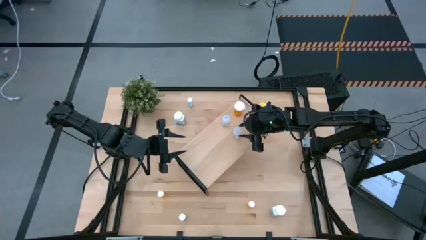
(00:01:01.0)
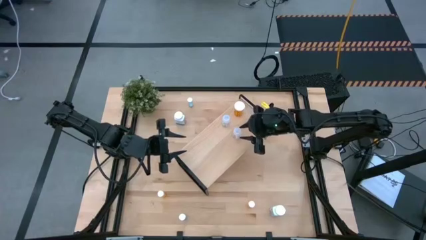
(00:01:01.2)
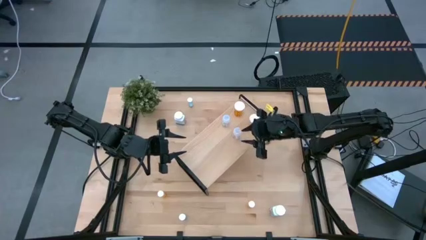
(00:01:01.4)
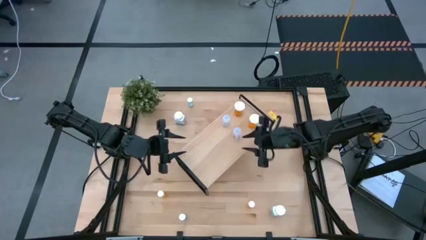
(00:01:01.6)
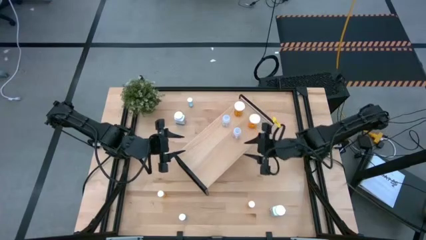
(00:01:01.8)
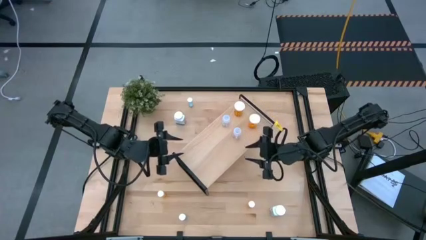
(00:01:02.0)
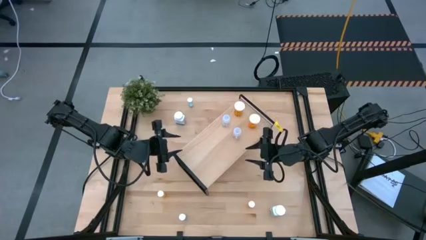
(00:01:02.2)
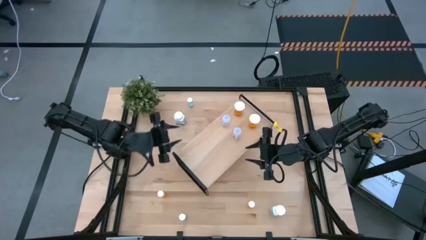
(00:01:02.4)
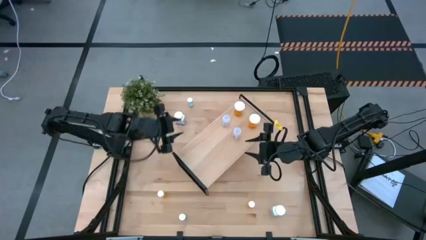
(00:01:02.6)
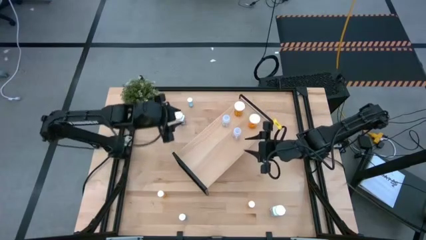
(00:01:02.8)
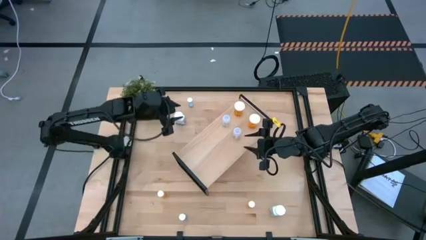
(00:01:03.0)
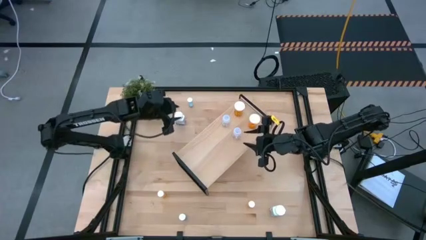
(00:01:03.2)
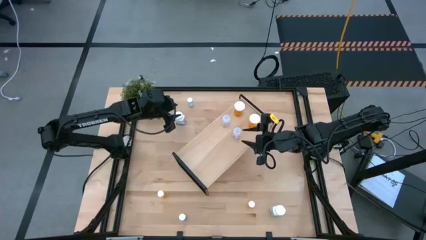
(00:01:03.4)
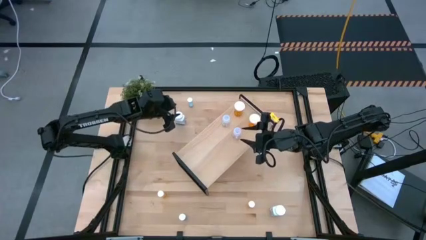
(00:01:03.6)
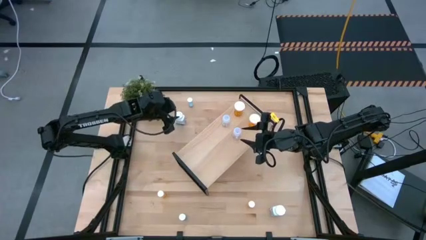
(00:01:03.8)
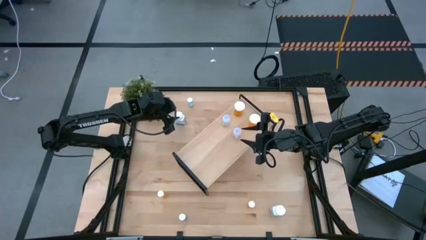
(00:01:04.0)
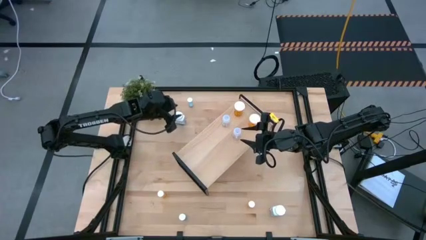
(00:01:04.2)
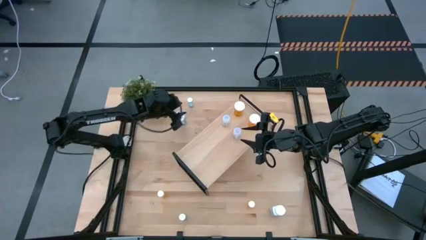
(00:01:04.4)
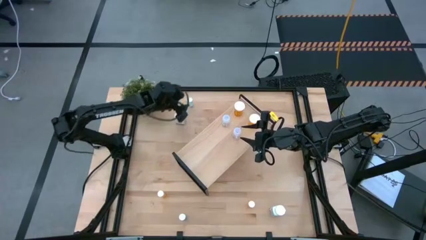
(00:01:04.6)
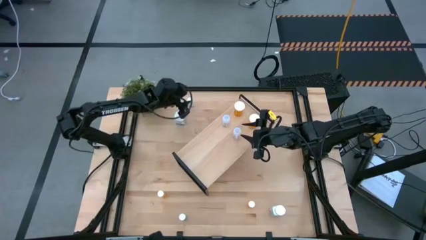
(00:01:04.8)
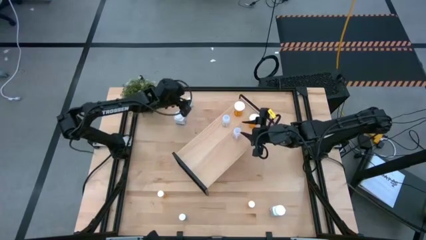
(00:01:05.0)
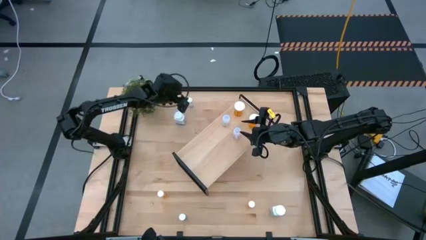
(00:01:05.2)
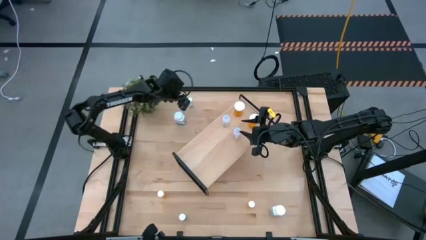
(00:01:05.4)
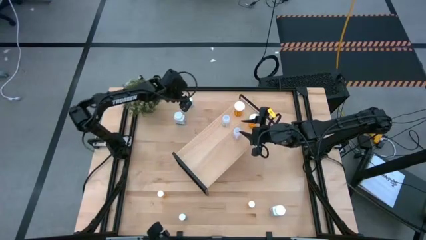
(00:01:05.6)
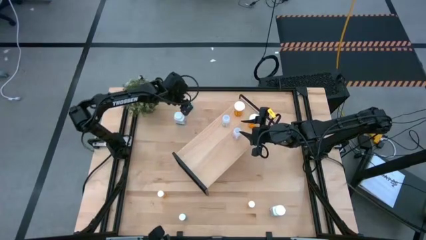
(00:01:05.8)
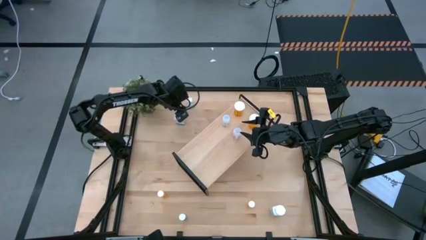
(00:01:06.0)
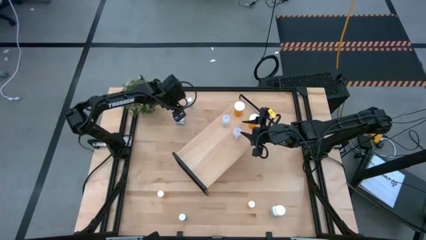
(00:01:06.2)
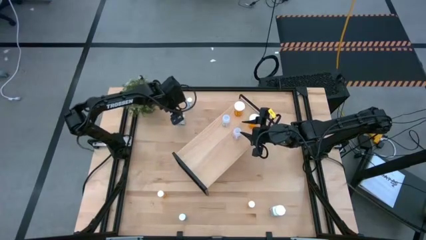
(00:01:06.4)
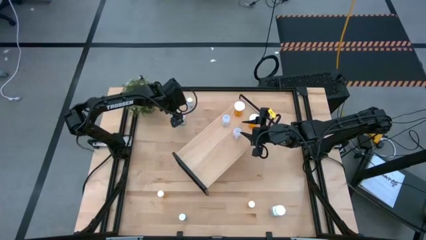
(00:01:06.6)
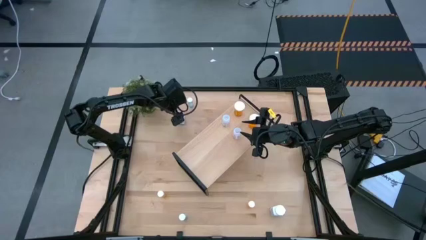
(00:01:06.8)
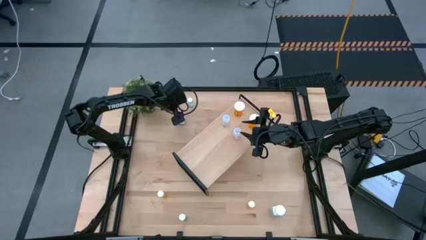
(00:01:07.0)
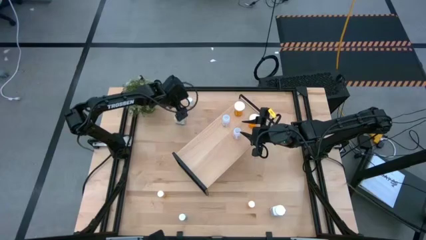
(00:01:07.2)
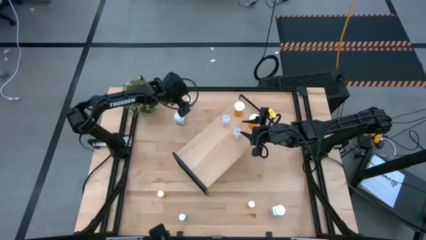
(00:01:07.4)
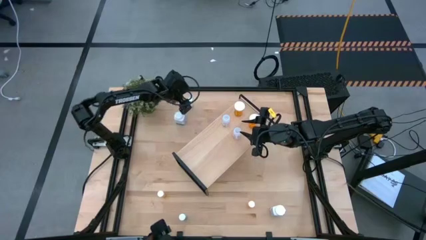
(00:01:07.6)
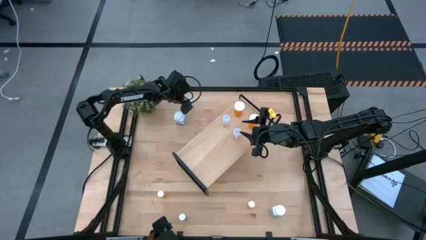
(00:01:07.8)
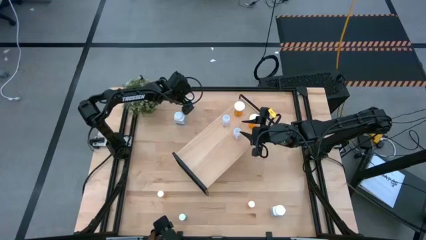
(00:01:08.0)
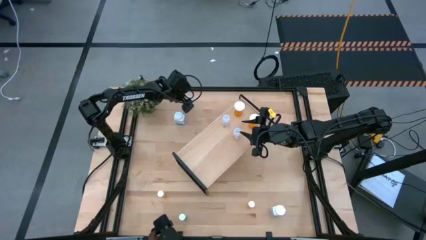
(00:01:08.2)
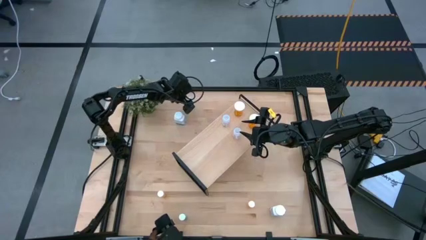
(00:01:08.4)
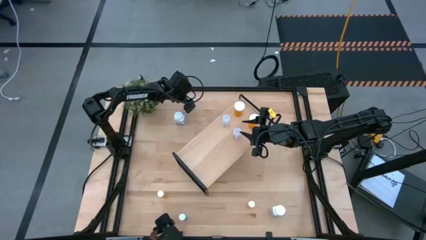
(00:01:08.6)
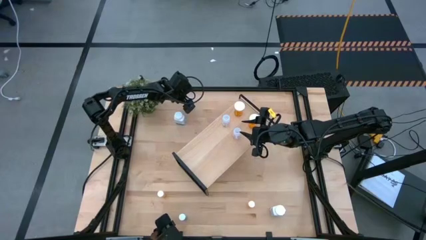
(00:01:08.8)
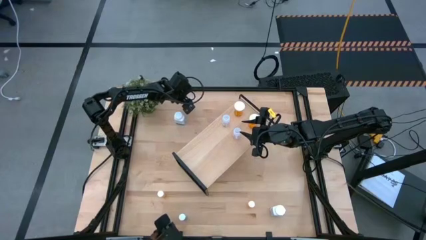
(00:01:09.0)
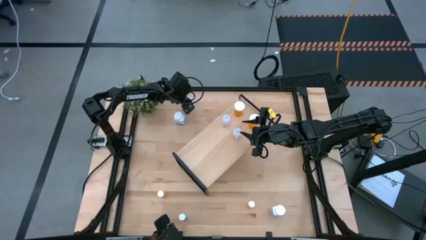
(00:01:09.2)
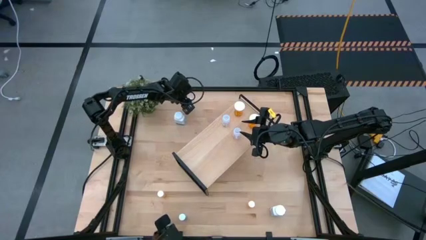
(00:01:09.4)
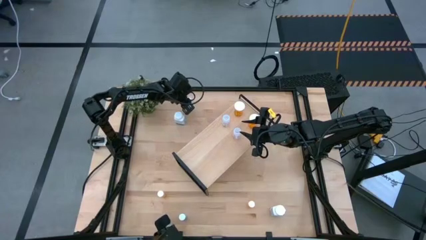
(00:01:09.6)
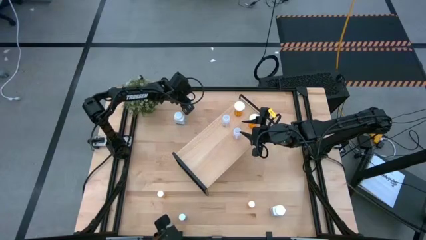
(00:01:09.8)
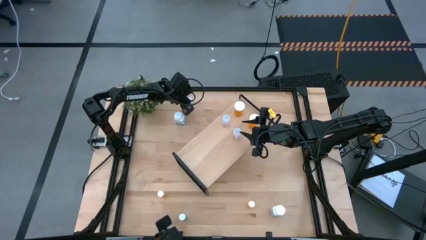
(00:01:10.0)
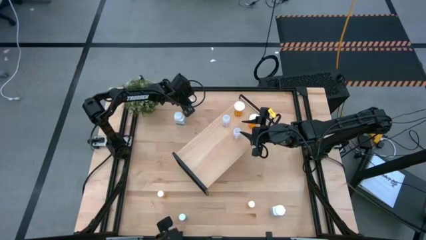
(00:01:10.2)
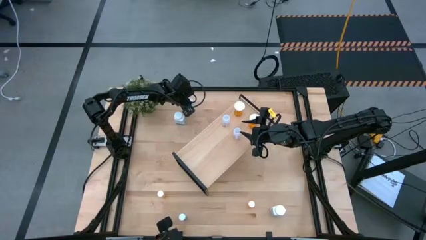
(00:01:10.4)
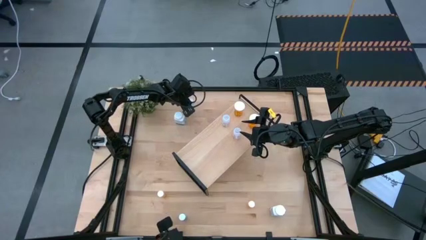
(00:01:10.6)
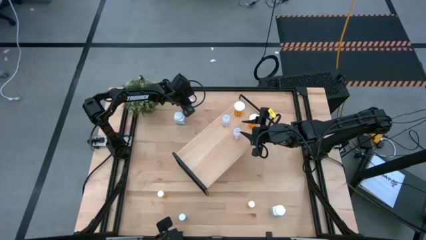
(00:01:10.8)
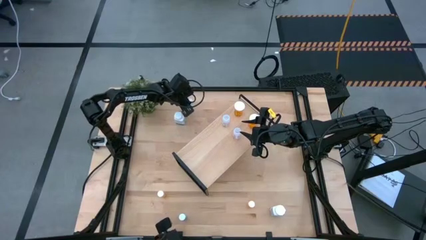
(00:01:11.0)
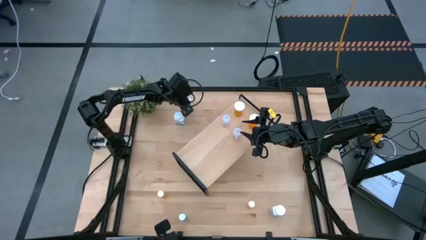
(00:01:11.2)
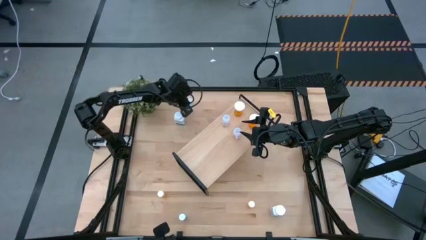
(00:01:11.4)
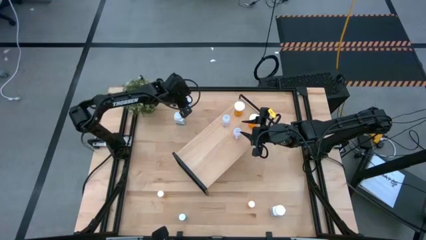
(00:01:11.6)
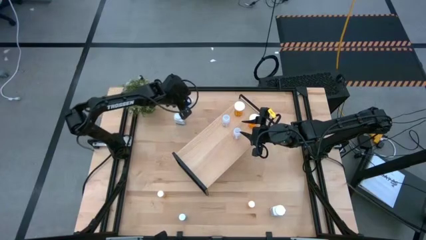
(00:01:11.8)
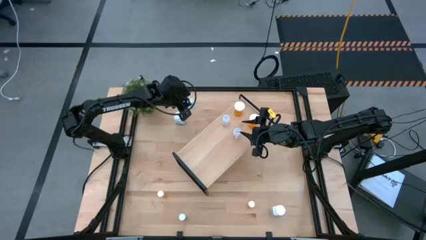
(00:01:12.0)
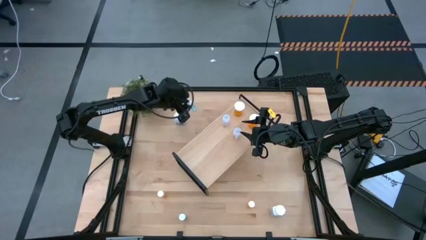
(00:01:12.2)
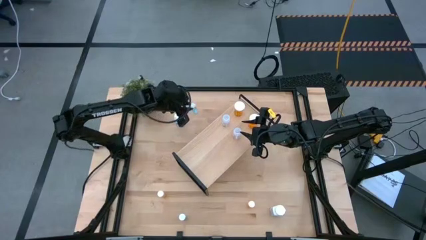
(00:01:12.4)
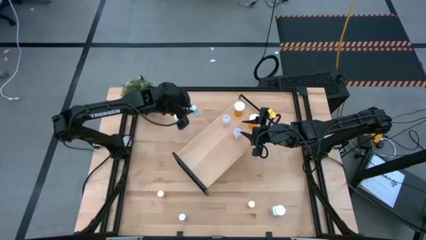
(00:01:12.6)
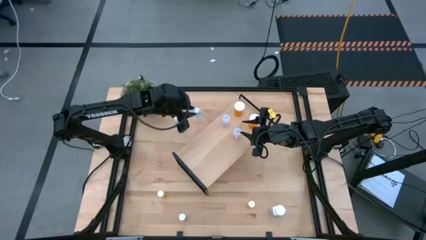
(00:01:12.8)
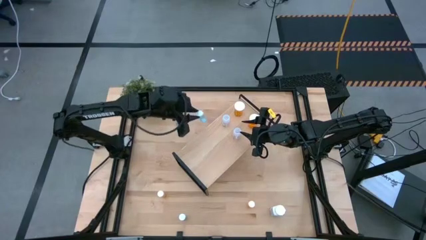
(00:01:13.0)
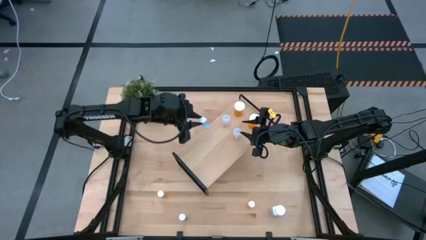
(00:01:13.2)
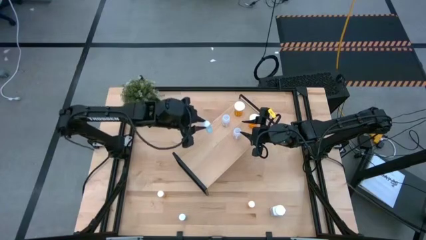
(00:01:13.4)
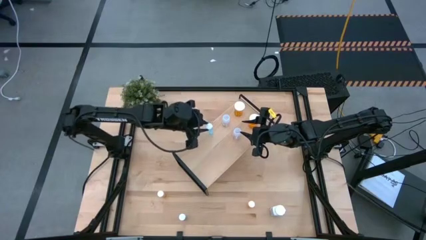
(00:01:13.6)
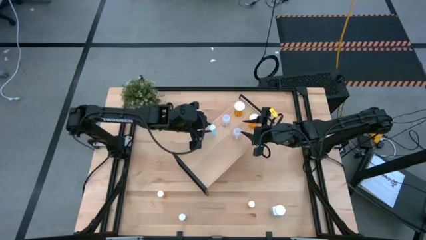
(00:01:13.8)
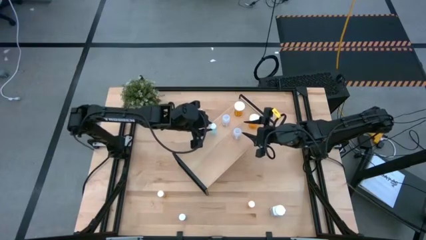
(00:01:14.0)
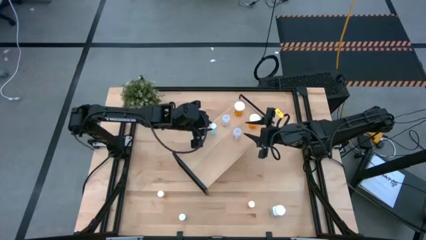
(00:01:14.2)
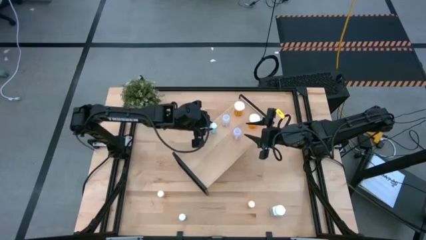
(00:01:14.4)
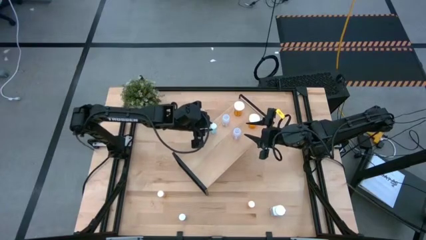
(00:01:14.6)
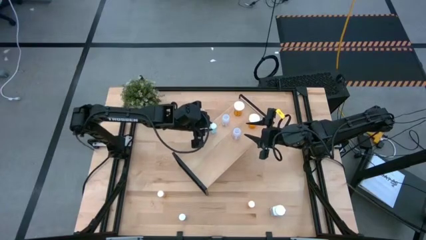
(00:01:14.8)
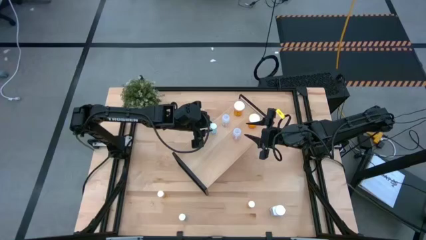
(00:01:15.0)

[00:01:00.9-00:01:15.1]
Task: Pick and place medicine bottles onto shelf by color
Put the top blue pill bottle on the shelf
